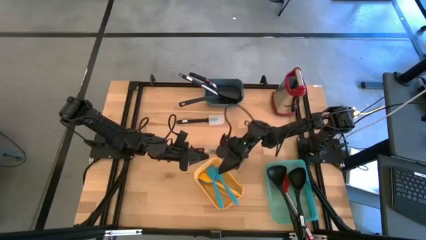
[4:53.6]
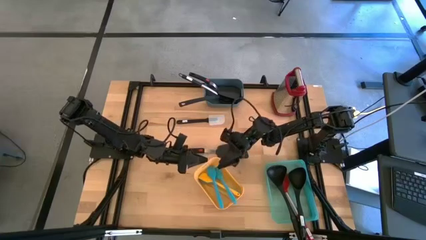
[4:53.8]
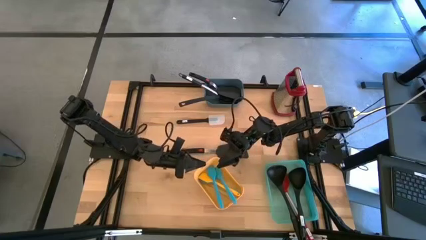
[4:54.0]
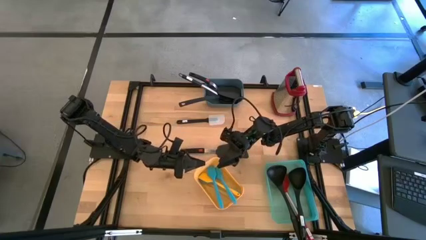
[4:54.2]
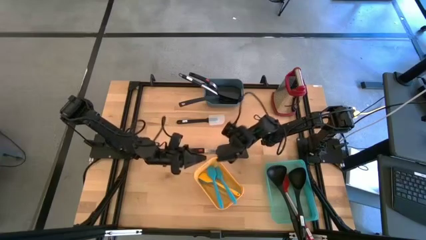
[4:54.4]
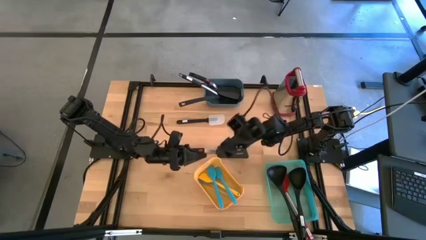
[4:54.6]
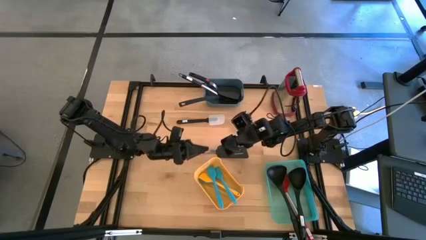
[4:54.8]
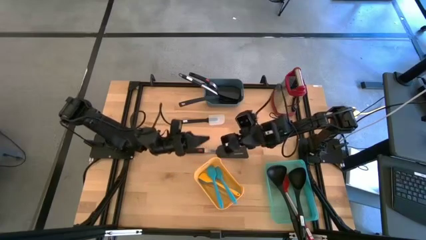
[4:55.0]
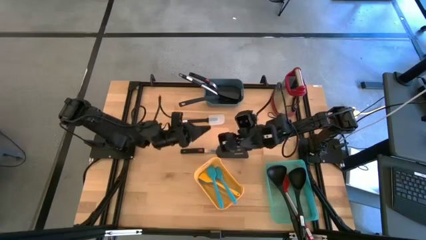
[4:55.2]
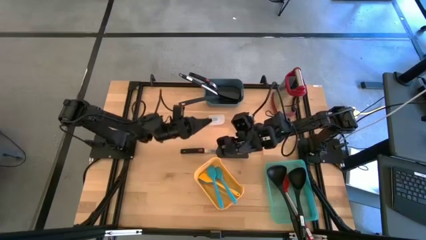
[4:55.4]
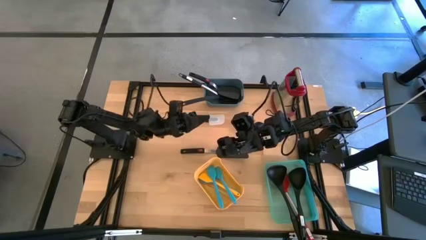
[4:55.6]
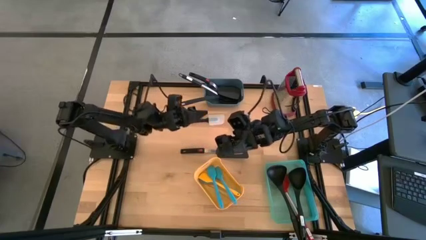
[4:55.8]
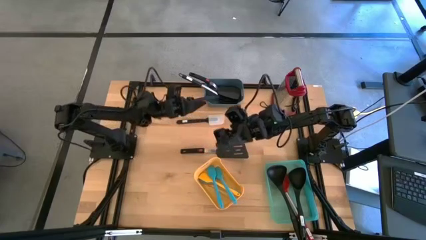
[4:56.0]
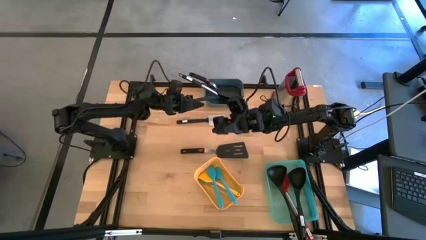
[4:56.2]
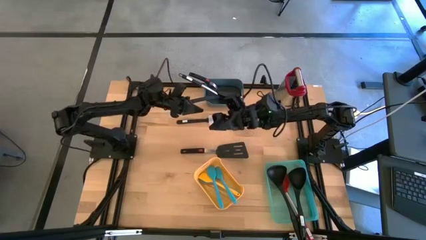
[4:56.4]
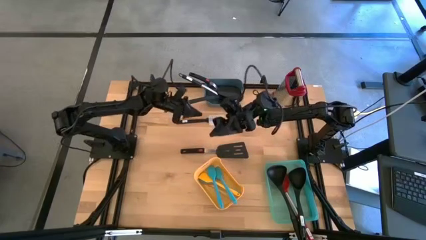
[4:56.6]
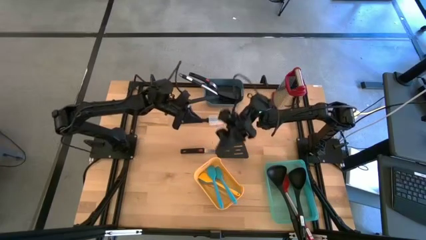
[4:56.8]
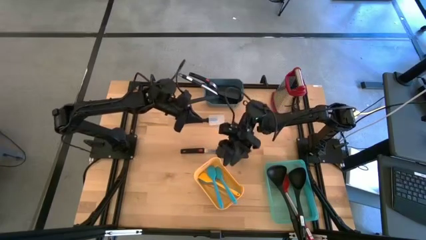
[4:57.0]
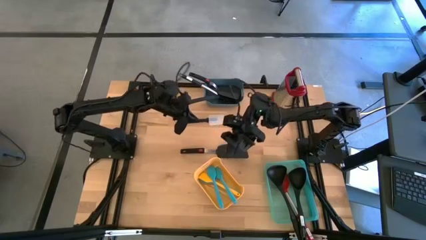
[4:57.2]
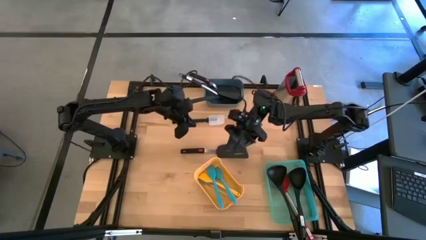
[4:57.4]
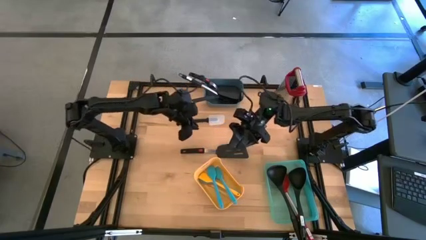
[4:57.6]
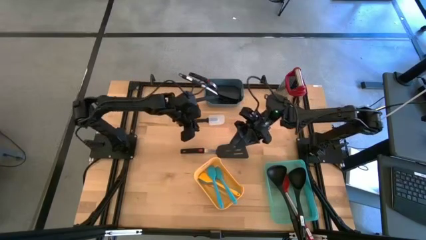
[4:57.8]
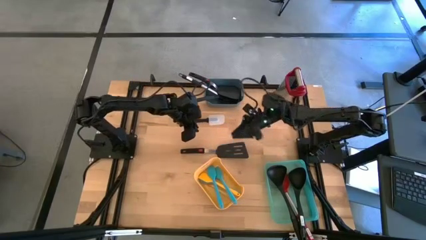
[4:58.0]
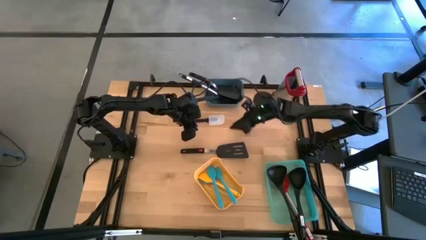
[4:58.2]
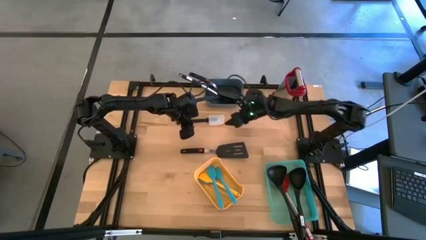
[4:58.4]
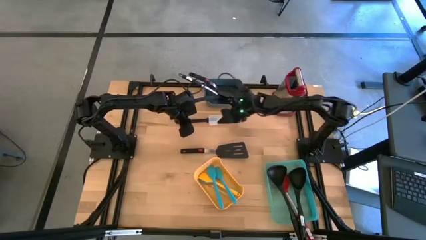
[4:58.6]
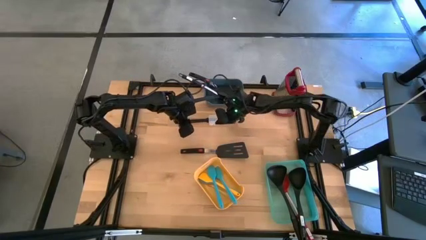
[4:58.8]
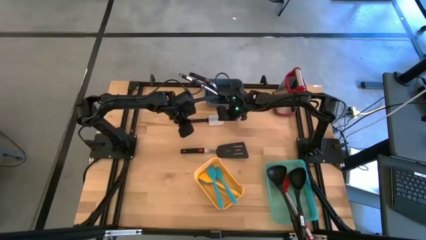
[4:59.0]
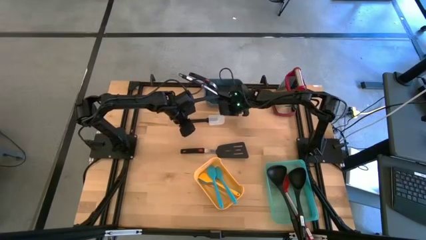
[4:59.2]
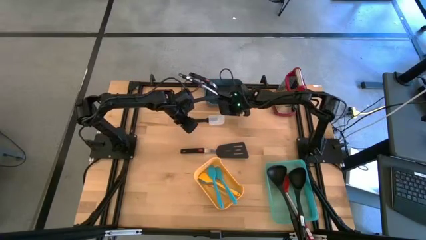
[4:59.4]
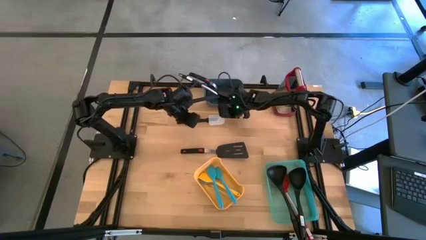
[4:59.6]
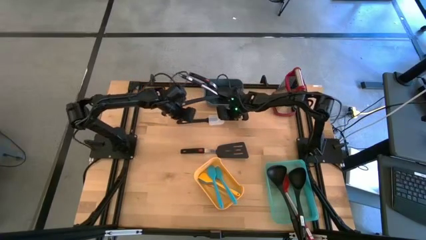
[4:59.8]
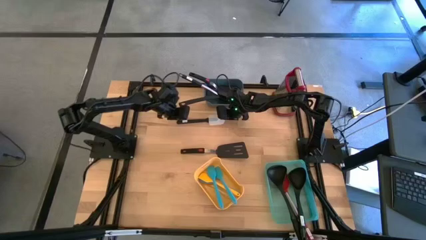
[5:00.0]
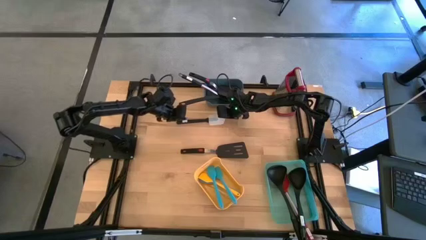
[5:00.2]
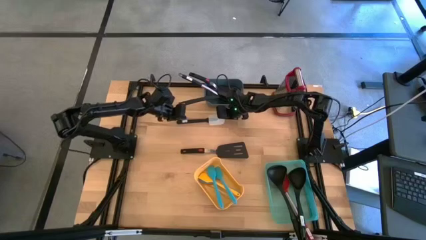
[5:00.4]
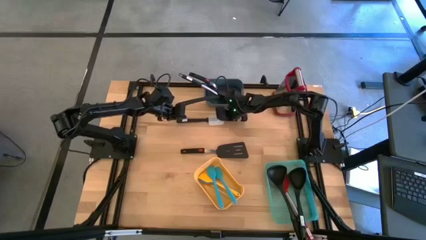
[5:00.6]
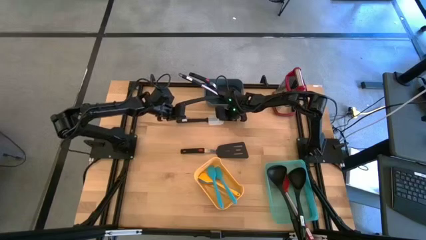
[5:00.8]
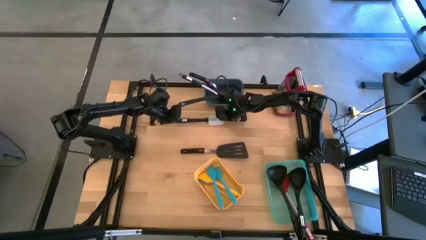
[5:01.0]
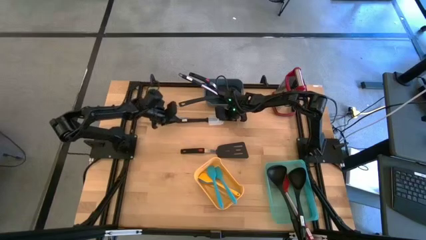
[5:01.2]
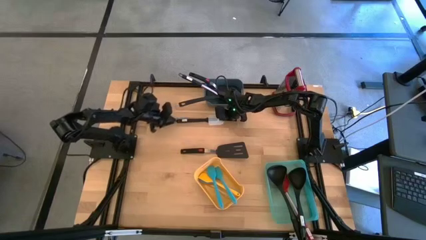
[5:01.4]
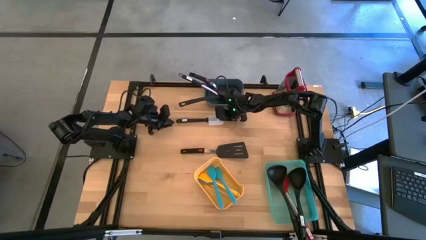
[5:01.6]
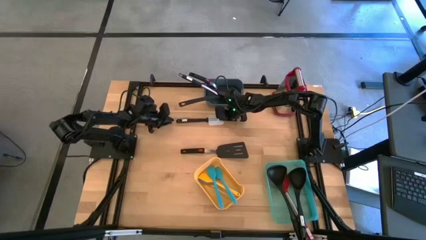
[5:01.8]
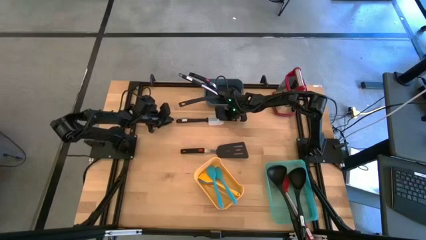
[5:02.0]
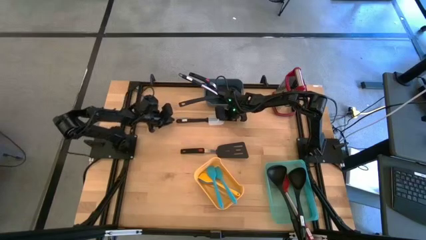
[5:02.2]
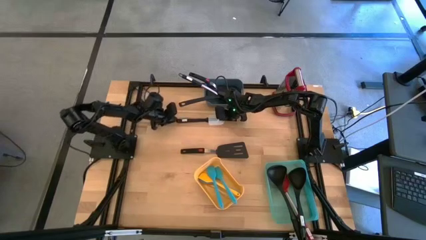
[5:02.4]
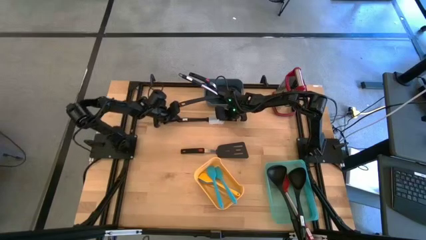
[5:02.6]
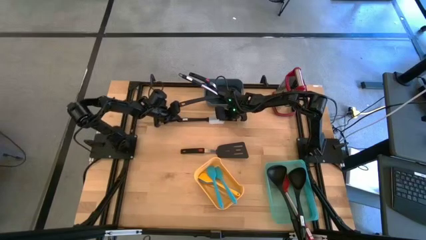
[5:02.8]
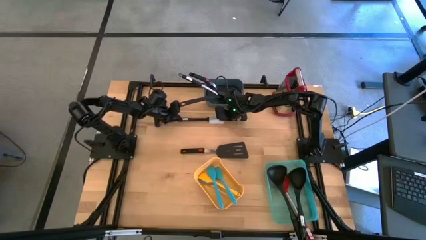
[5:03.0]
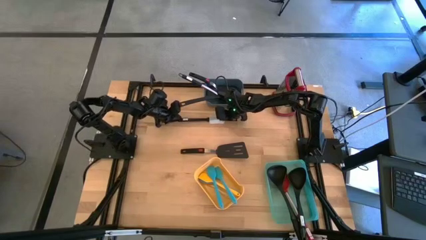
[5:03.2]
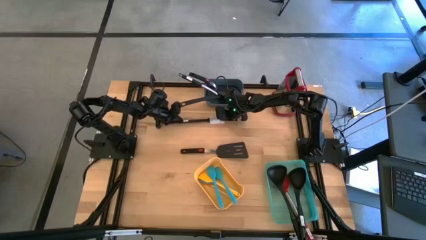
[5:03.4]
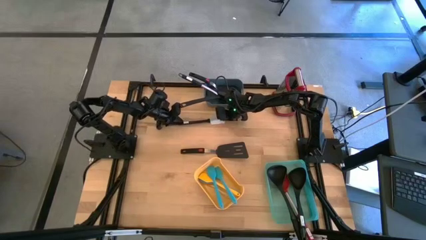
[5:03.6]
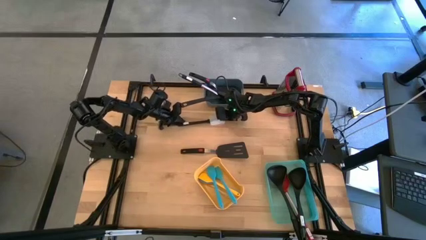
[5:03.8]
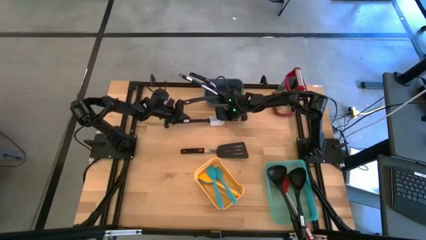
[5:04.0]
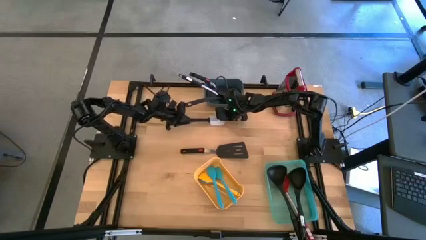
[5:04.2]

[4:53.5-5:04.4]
Task: Pick & Place Kitchen Items
Put the small white spatula into the yellow bin

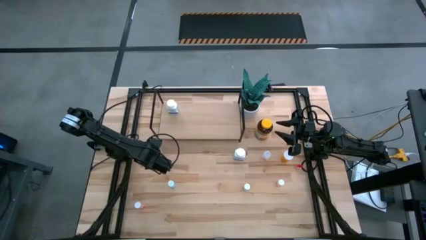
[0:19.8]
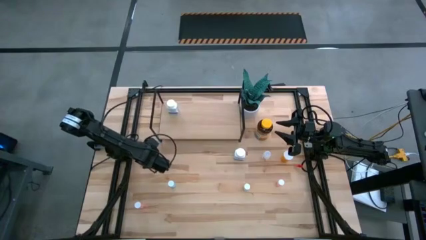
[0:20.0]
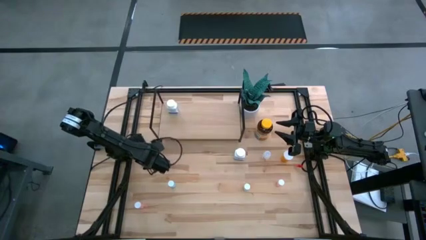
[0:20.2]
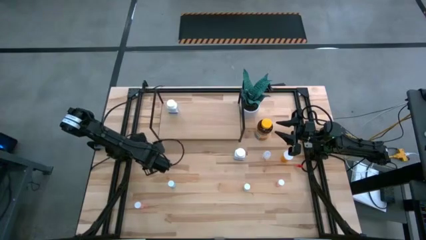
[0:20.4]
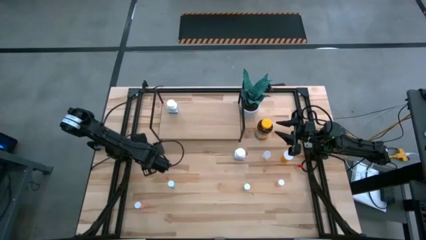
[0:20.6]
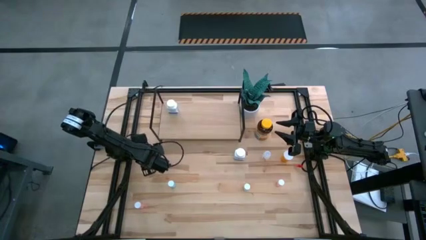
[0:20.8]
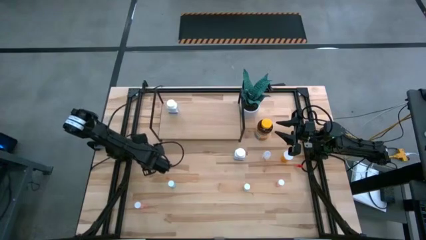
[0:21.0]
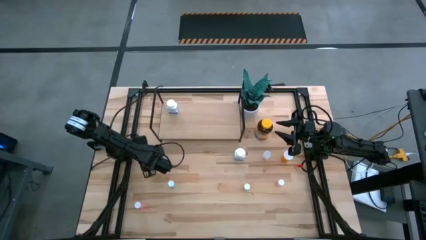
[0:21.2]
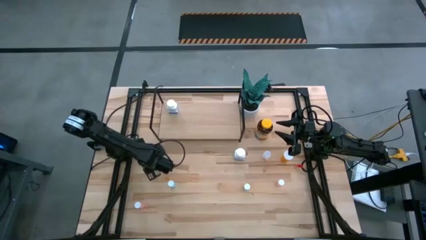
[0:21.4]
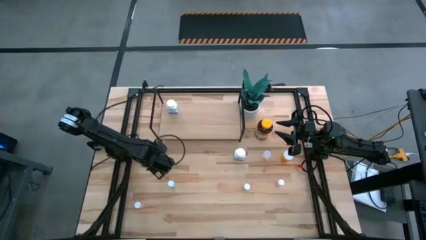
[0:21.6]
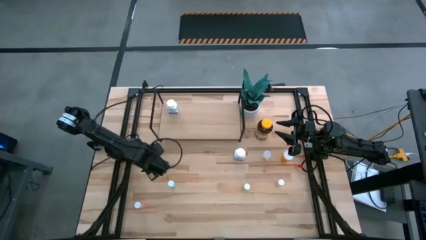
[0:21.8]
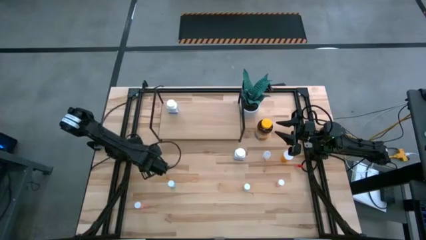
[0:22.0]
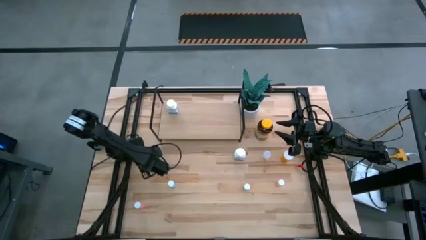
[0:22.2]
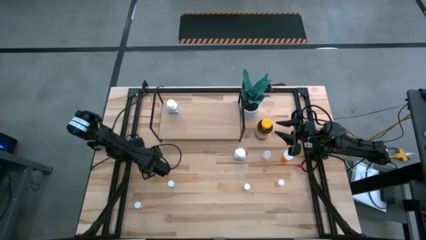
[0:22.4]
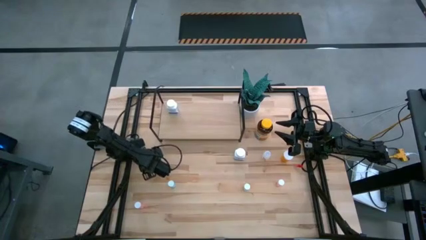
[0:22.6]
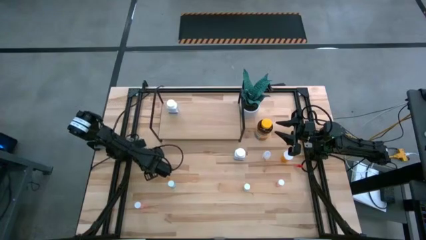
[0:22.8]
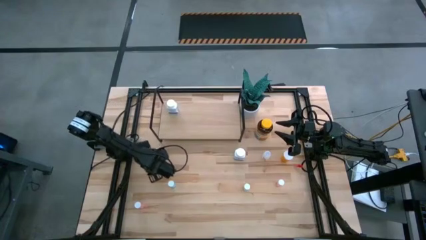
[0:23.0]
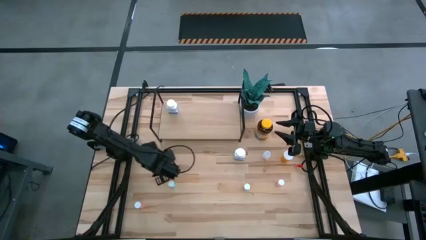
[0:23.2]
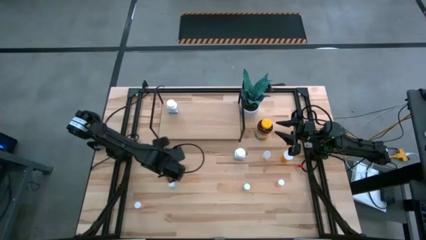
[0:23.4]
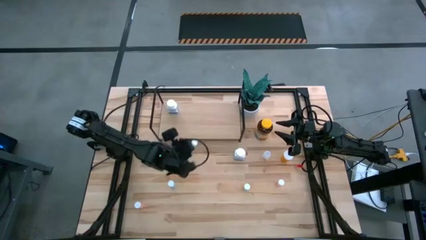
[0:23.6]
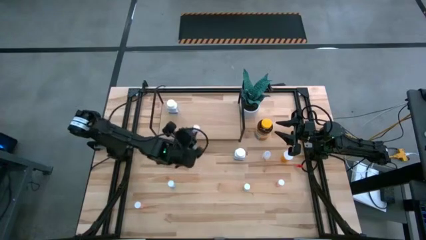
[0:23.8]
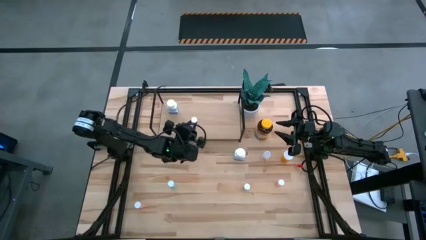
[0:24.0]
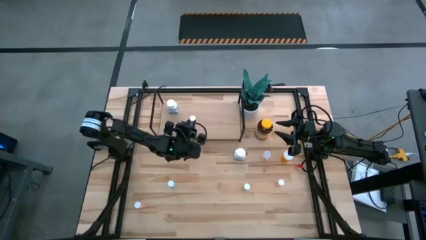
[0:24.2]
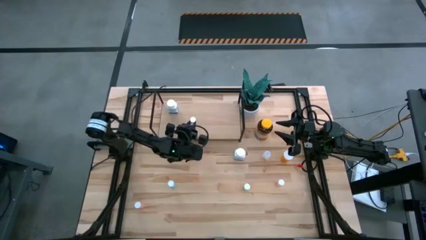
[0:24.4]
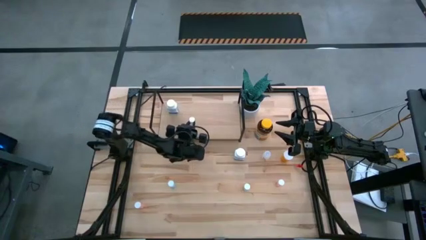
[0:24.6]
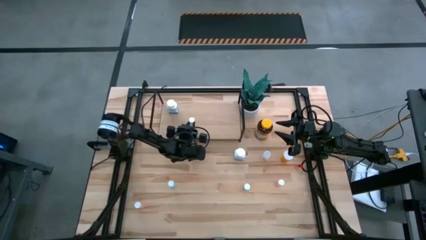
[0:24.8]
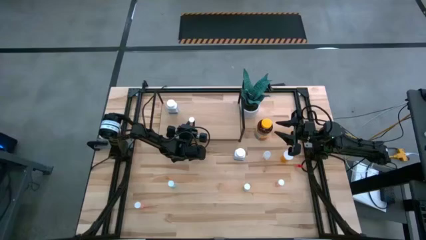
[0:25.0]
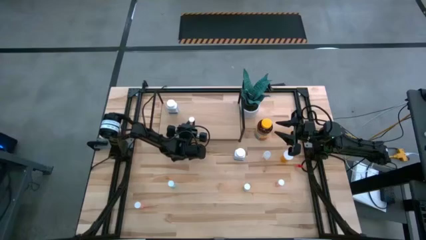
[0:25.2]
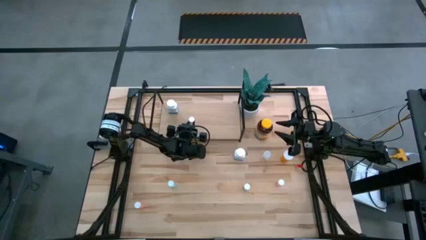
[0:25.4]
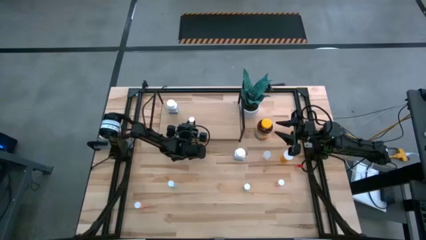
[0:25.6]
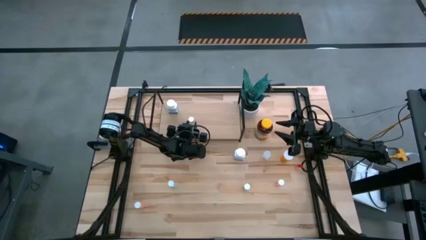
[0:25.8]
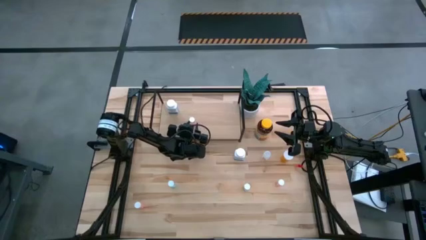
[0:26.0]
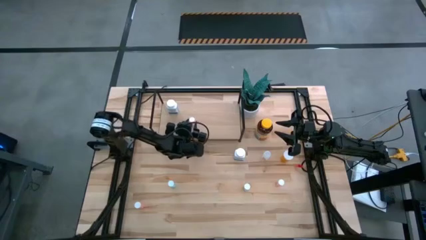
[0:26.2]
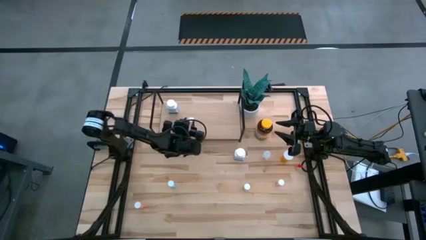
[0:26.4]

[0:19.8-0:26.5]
Task: Pick and place medicine bottles onto shelf by color
Put the left pink medicine bottle on the shelf
